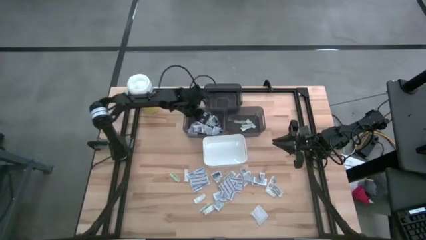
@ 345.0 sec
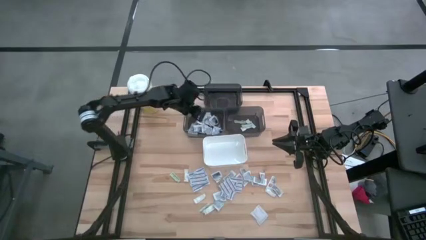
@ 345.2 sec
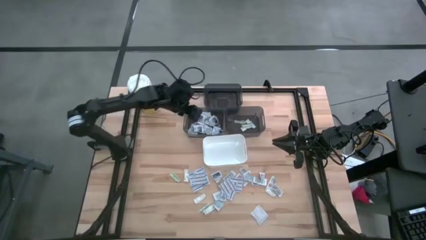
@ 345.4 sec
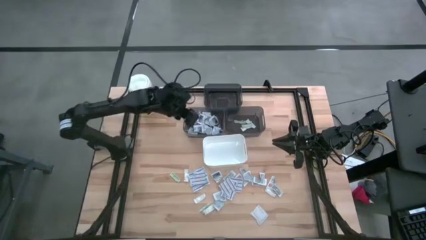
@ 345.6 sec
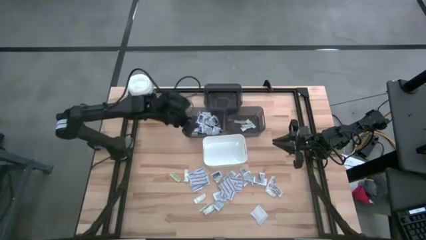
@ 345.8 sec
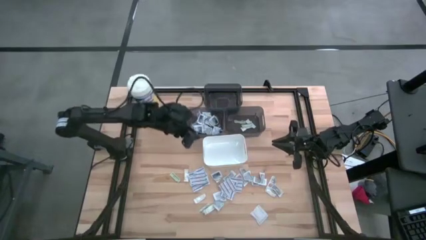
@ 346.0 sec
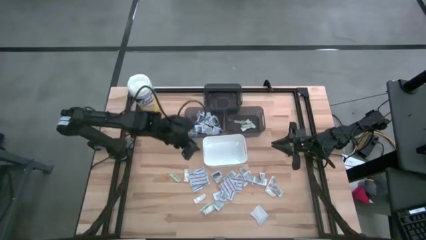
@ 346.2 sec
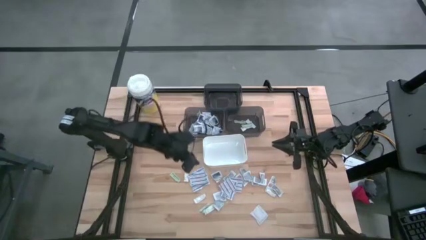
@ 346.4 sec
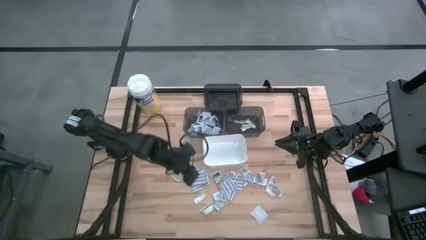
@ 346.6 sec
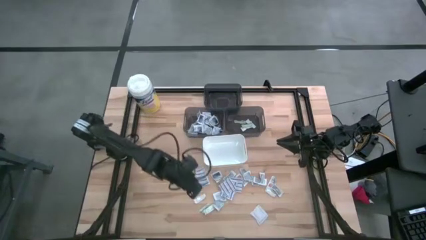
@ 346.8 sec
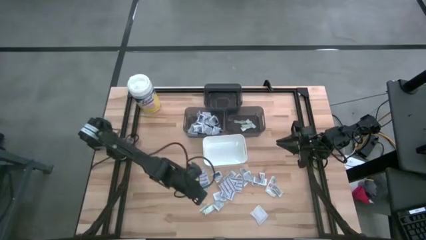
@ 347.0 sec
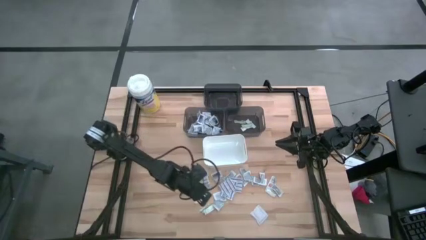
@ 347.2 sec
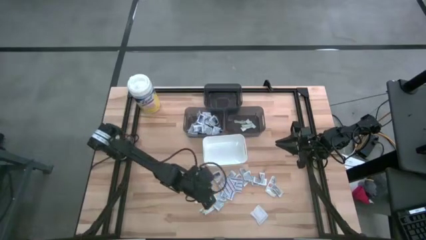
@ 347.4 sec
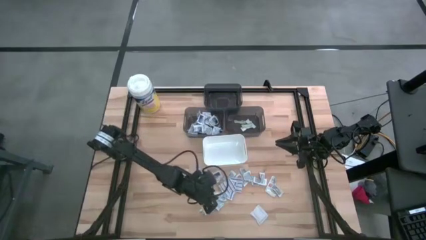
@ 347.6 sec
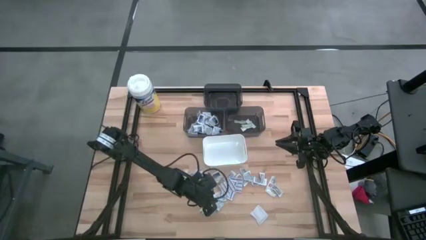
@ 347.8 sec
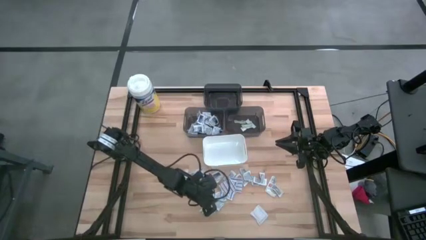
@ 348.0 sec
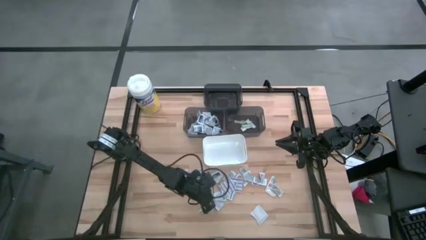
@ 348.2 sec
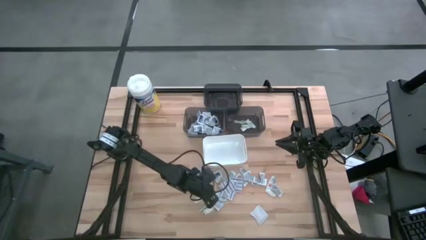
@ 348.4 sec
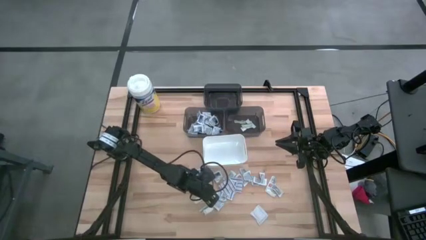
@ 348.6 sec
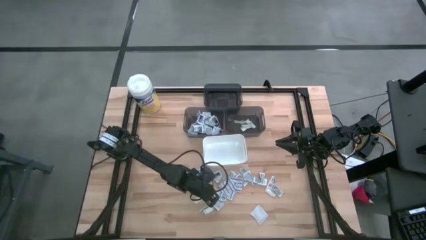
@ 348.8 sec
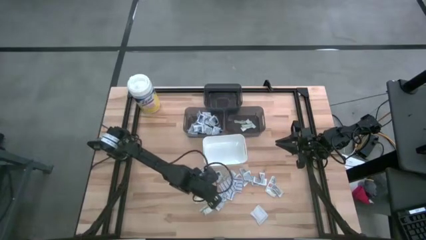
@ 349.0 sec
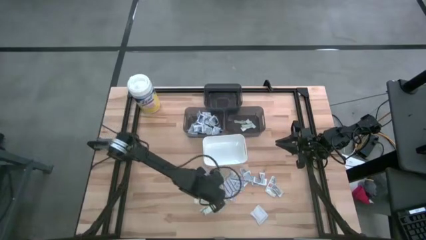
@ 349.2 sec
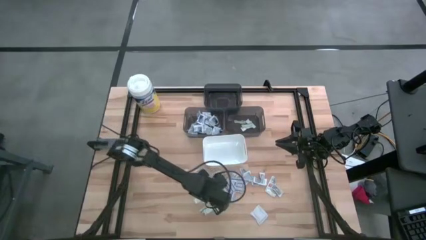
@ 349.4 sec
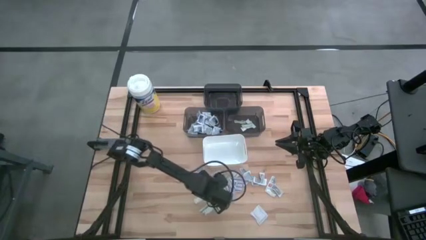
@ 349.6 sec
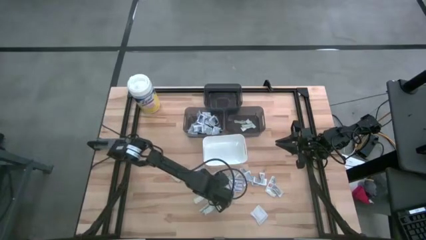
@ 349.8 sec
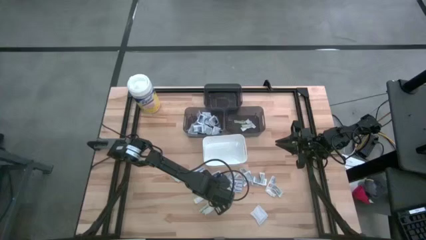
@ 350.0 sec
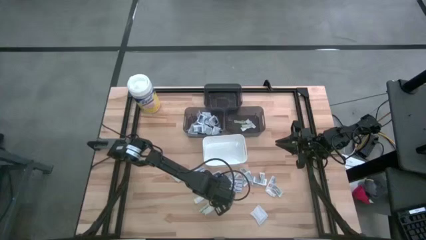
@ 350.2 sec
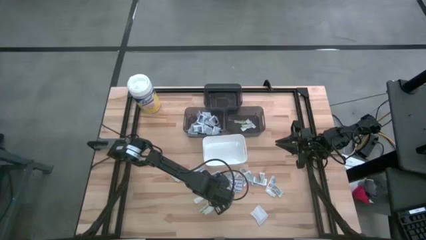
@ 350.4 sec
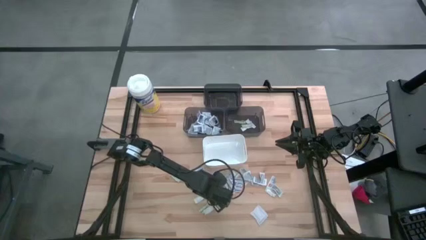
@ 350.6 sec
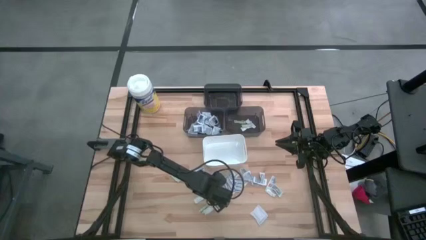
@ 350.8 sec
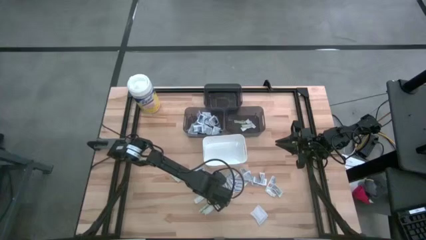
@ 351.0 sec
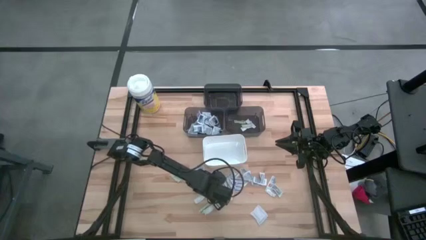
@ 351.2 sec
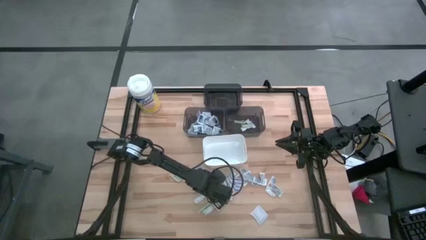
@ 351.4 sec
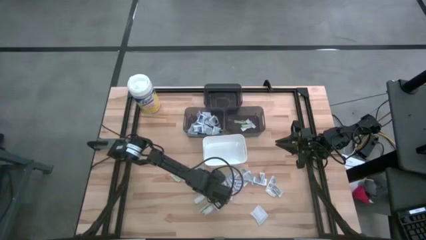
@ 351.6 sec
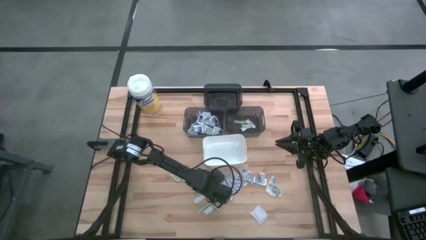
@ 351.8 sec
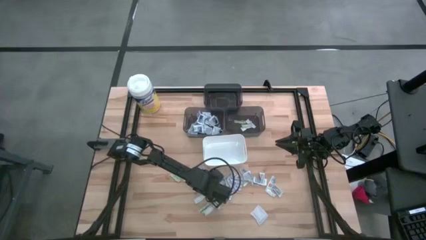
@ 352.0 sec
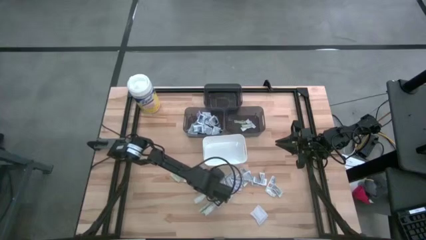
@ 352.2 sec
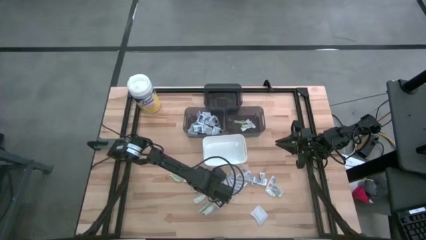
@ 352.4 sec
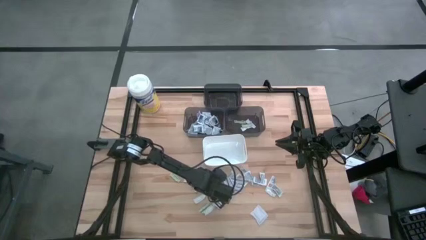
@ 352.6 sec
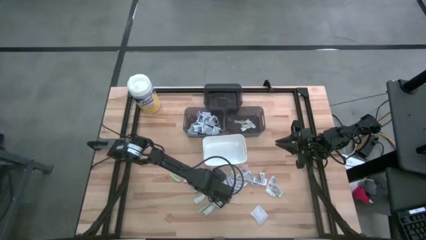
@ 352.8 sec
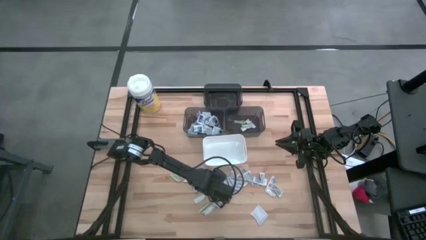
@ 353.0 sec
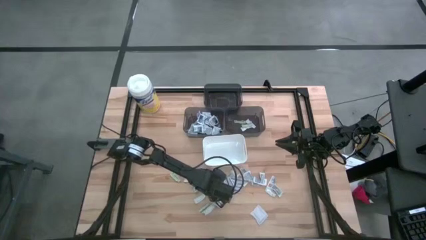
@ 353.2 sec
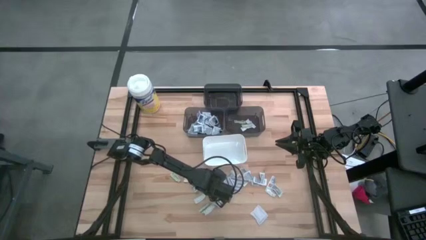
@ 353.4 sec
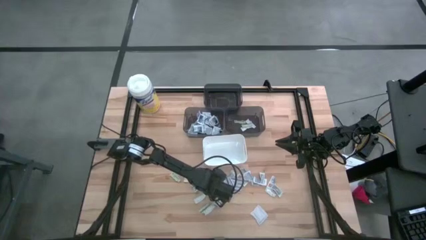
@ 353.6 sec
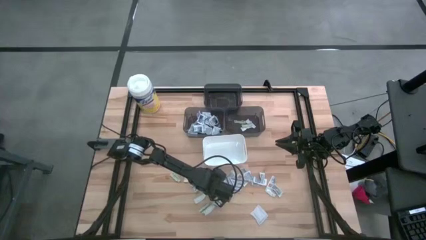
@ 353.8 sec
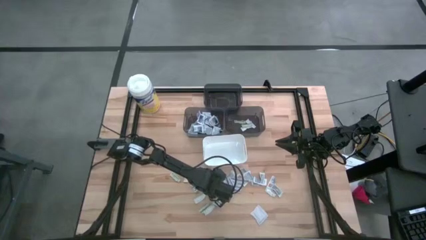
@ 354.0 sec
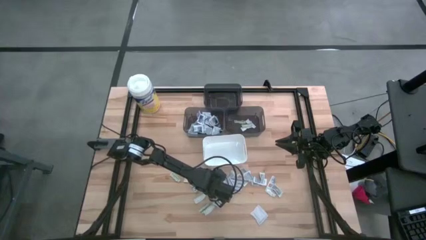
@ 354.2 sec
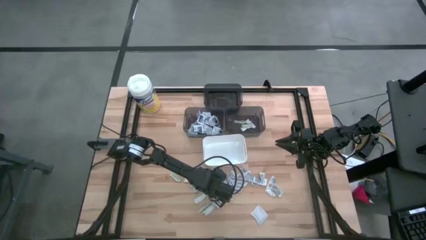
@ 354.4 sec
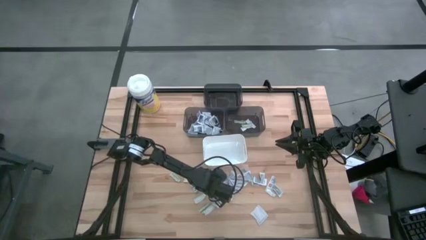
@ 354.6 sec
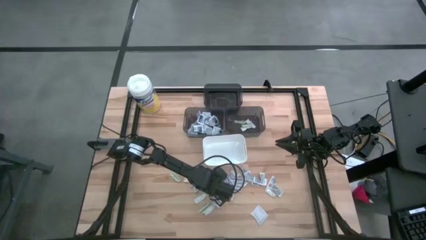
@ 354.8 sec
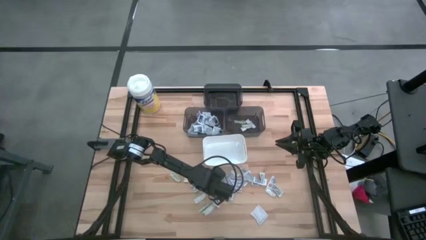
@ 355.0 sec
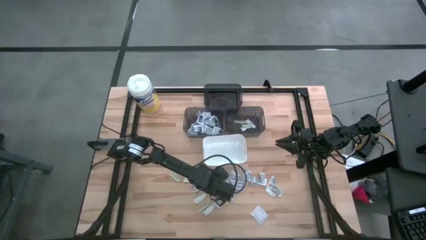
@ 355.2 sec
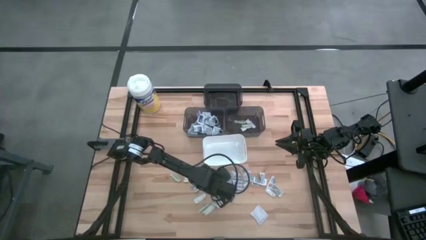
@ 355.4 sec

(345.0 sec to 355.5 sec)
Task: Pick & Place First Aid Supplies
Put the alcohol pad into the bottom left black bin

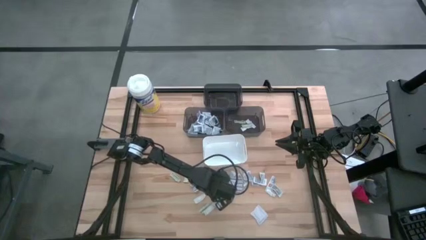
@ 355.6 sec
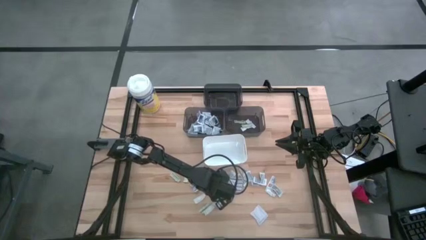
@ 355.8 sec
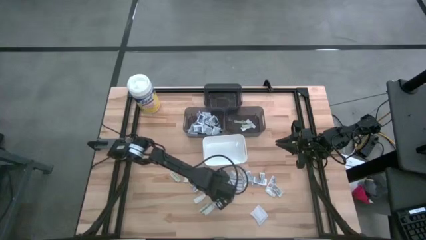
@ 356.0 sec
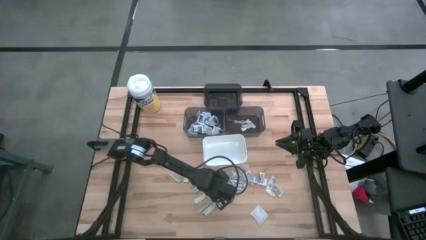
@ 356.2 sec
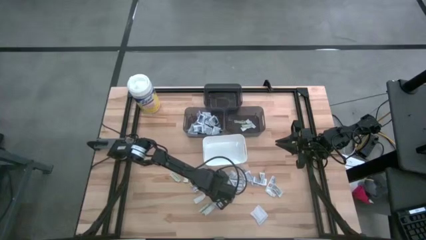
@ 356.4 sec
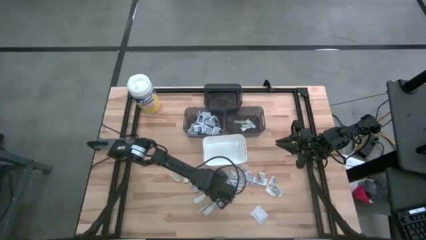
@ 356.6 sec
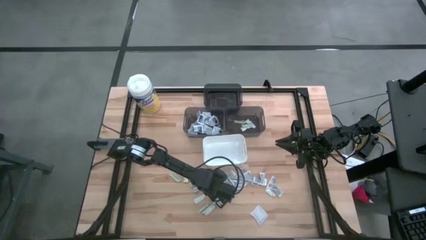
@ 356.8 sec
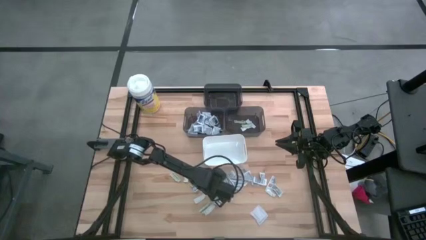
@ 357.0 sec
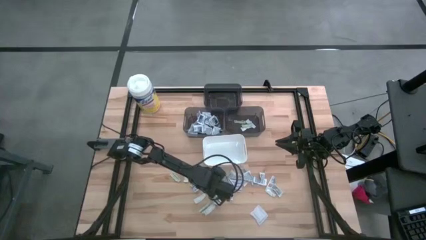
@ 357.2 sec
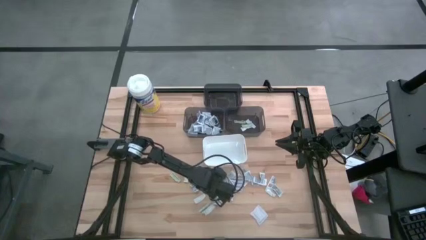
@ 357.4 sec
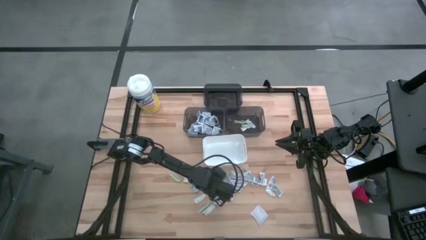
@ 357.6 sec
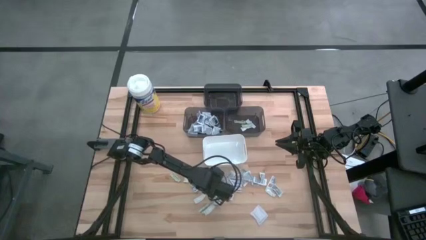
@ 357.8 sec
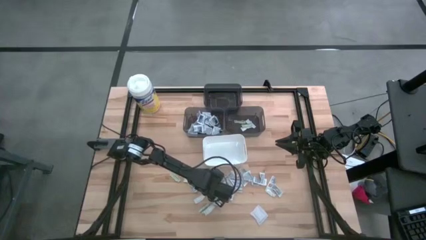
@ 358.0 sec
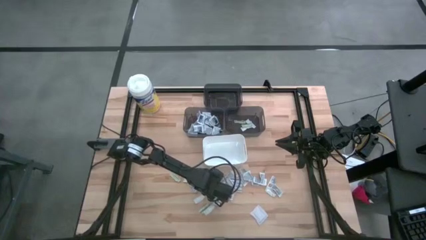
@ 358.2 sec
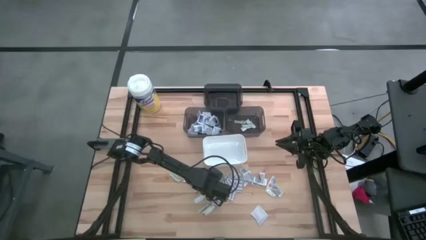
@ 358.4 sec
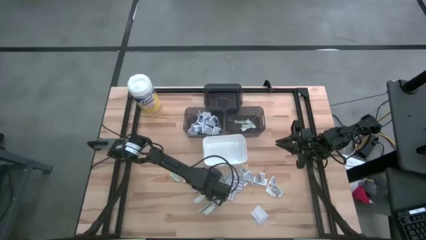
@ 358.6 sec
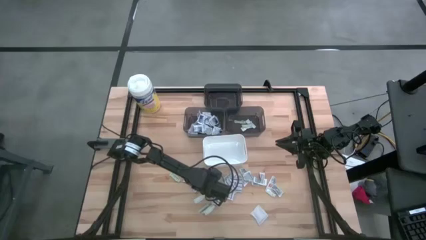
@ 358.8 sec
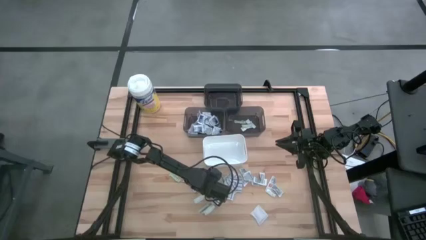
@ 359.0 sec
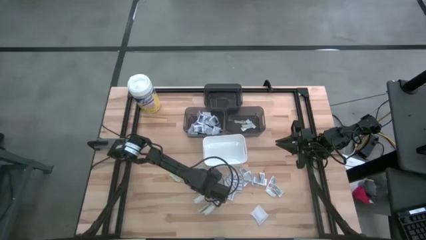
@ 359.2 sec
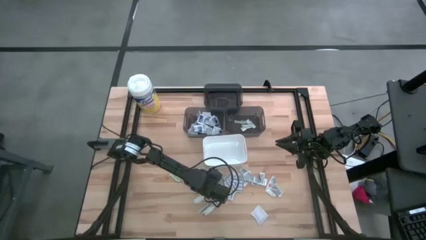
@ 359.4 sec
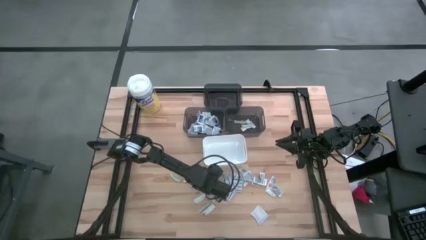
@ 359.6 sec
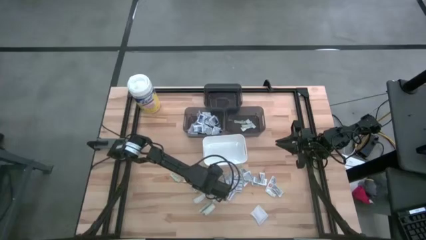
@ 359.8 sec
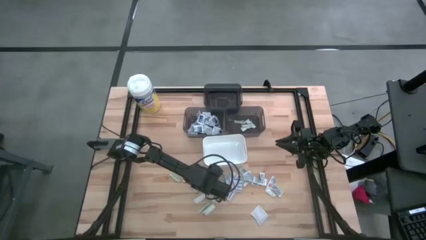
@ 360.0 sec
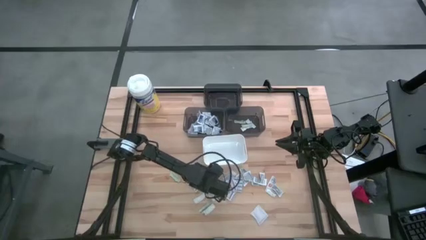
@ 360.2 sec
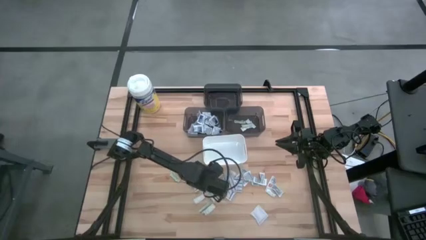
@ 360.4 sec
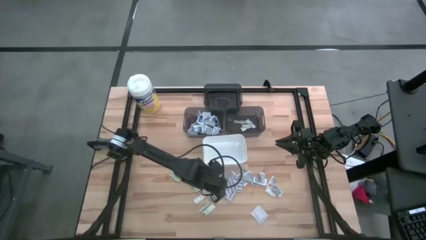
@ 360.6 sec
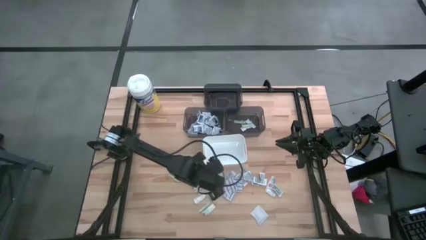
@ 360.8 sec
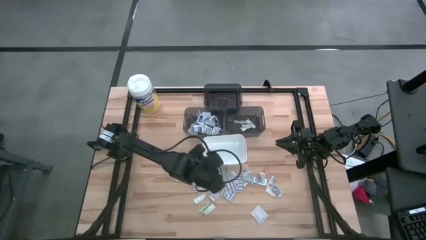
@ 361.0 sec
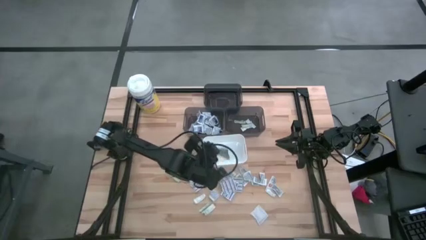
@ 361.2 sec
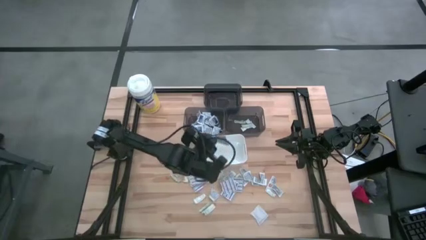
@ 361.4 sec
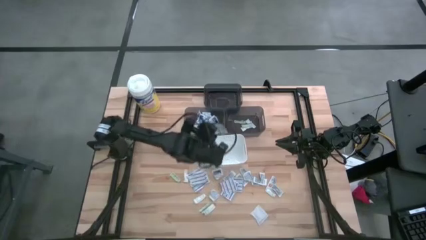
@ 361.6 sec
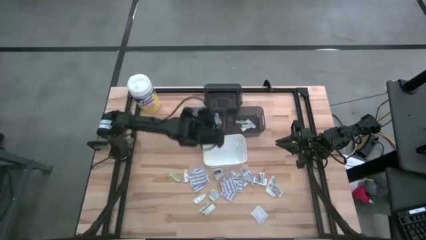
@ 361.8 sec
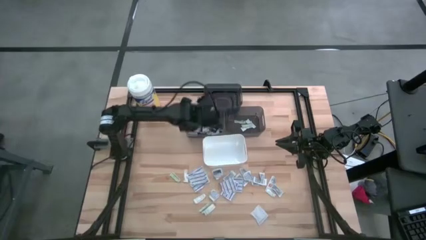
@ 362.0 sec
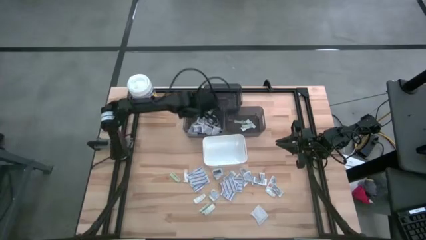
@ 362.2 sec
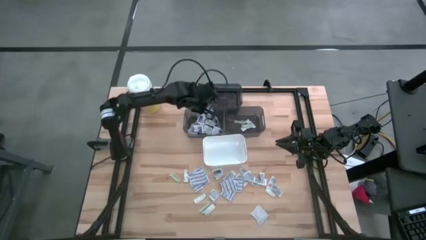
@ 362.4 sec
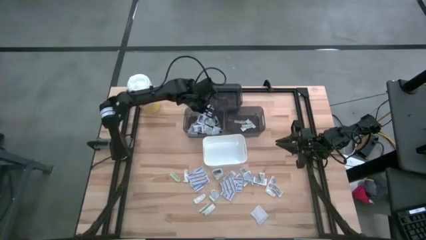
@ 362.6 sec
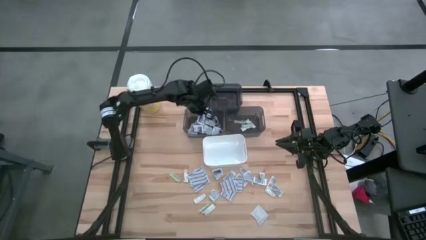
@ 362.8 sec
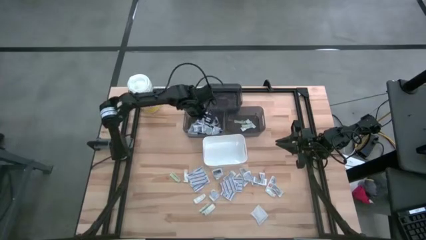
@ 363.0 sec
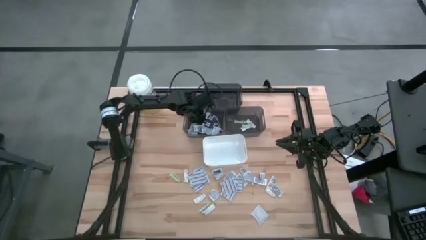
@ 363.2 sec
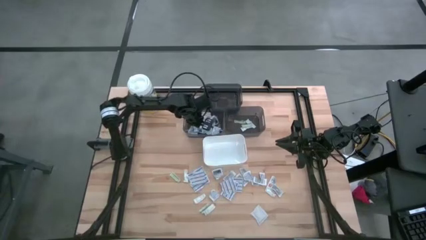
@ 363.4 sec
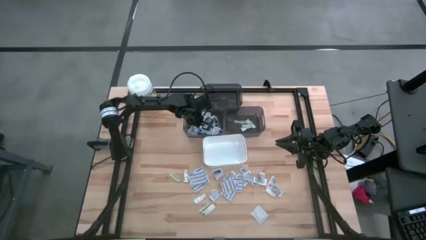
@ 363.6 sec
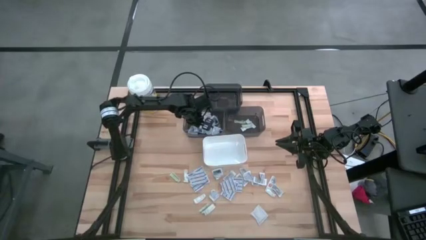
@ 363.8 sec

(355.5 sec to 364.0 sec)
Put the alcohol pad into the bottom left black bin
